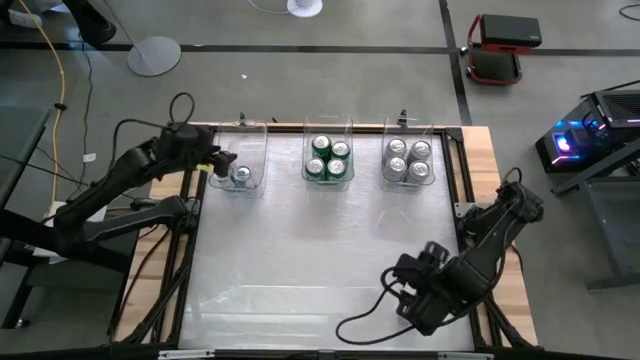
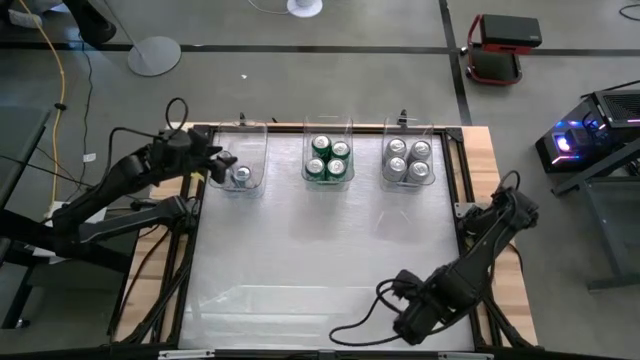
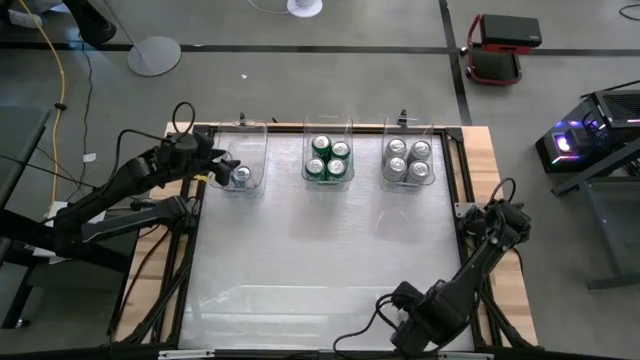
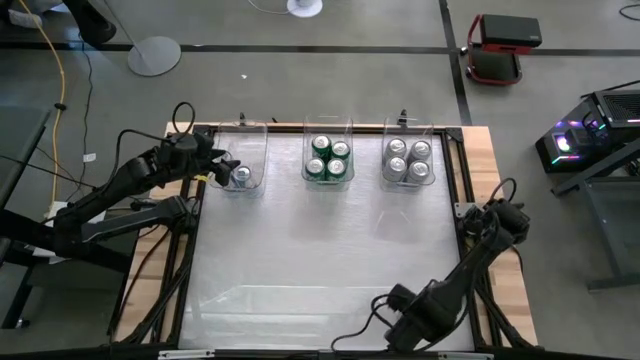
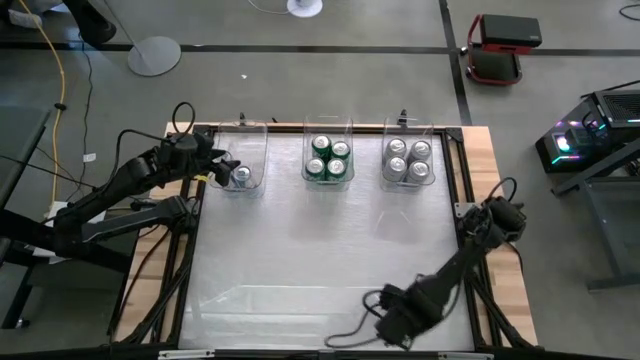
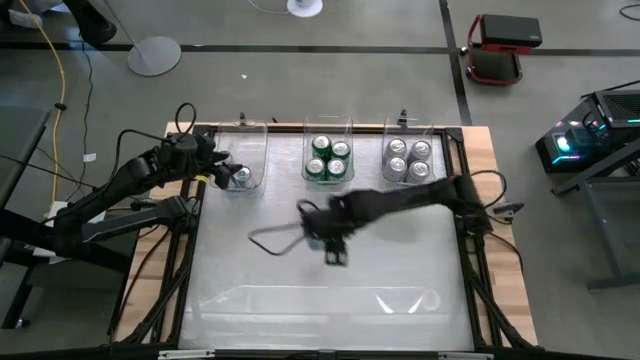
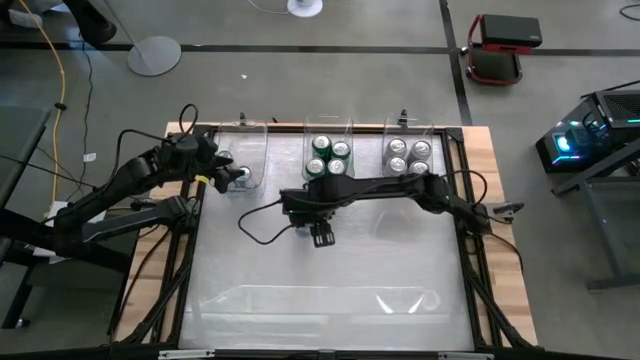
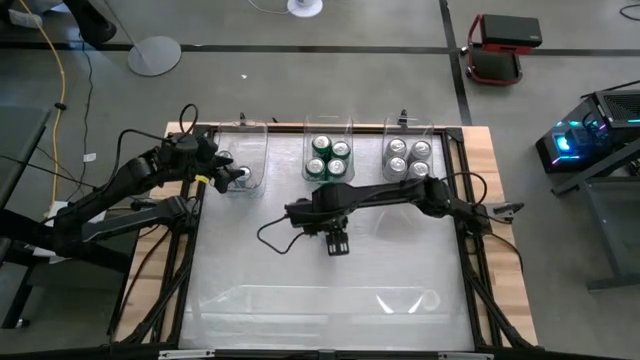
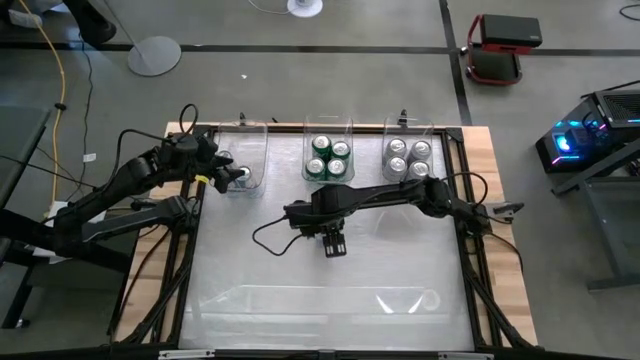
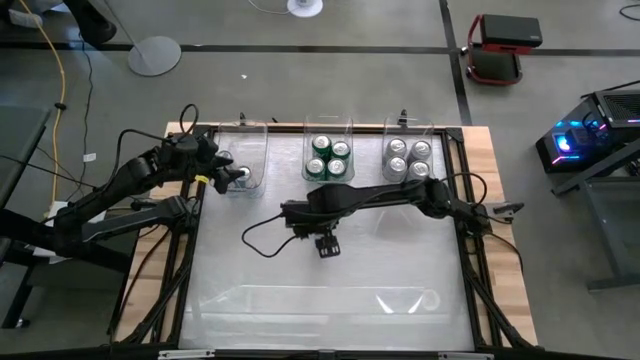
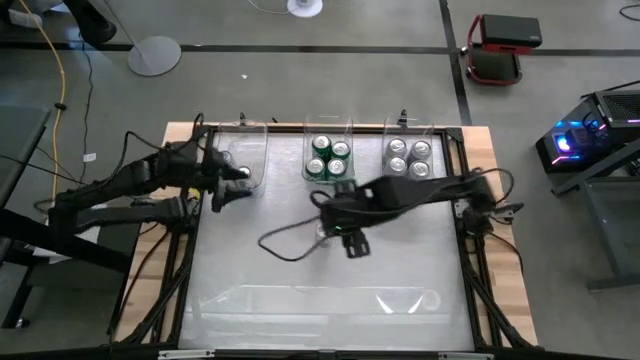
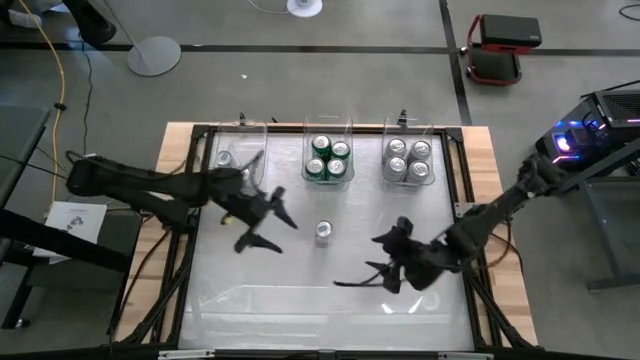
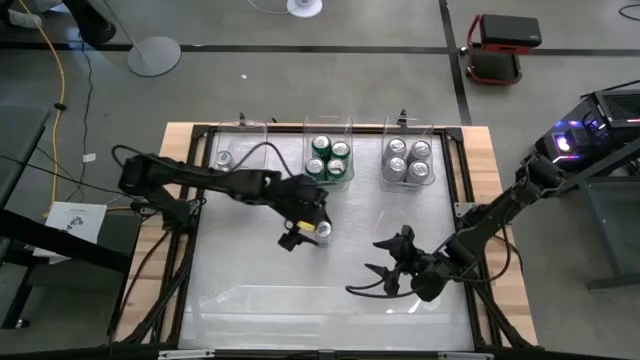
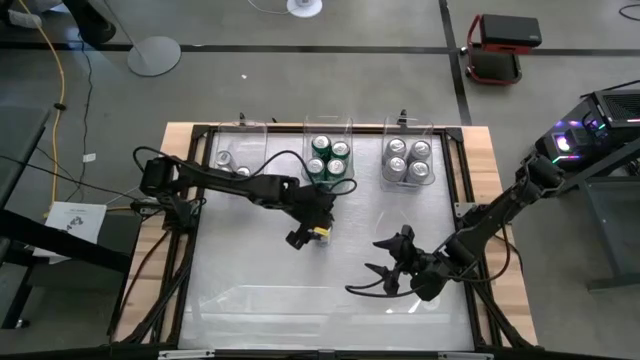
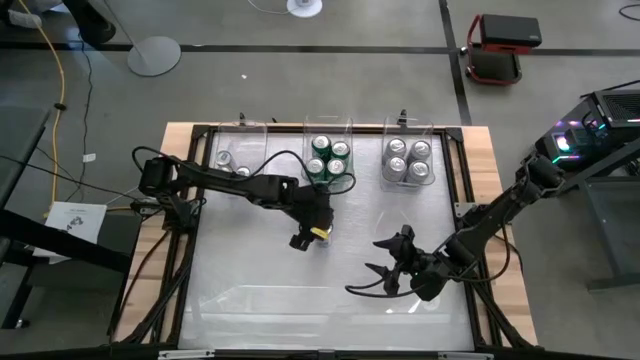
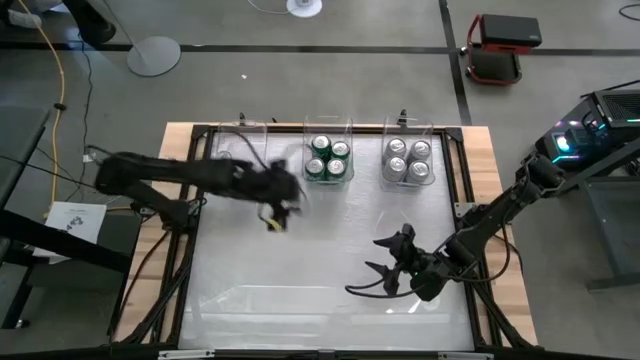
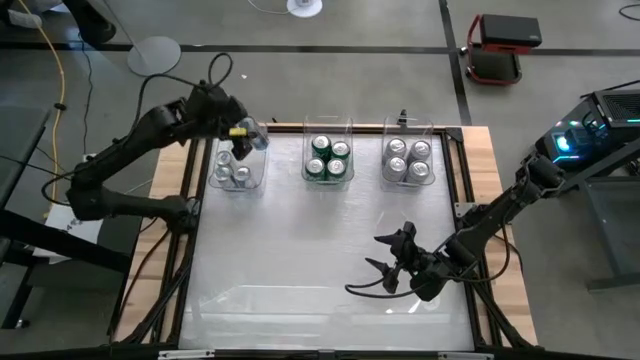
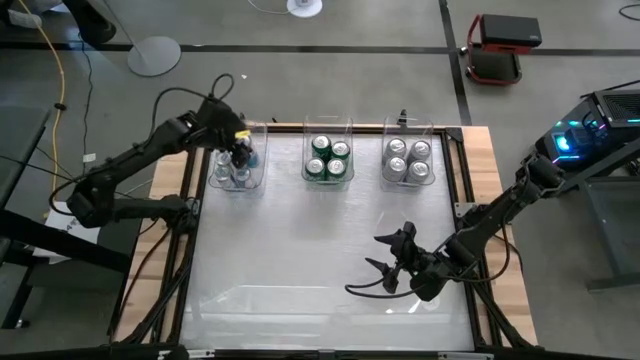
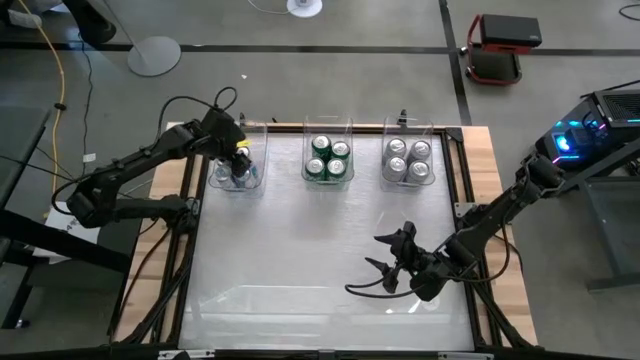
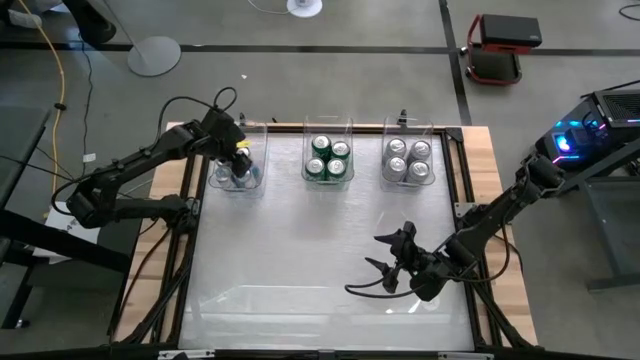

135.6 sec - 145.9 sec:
Task: Sort soda cans
Put the blue can into the left transparent bin

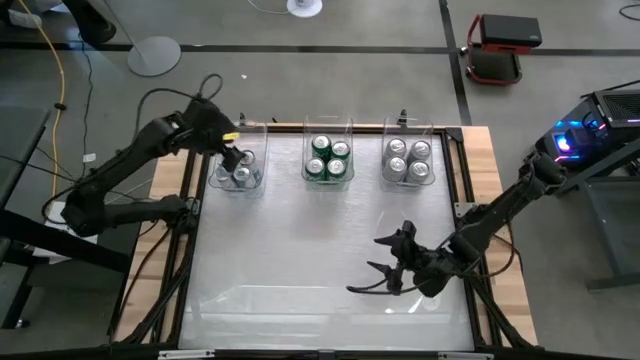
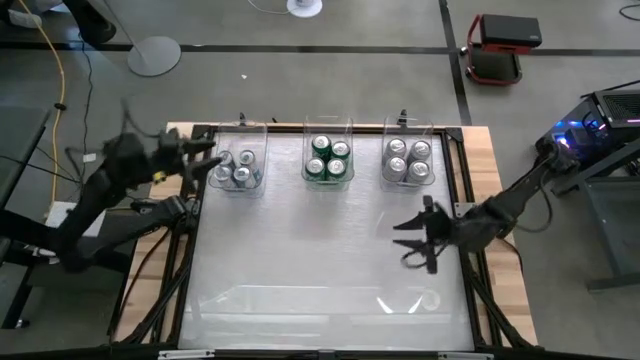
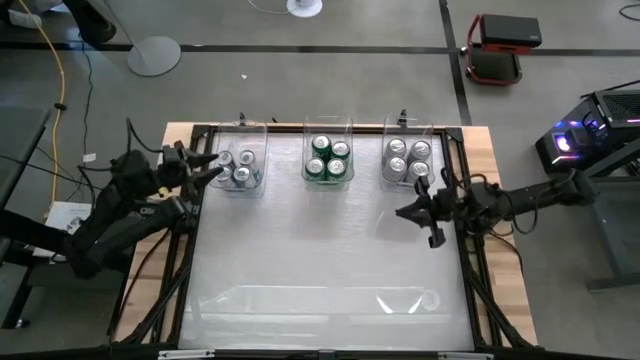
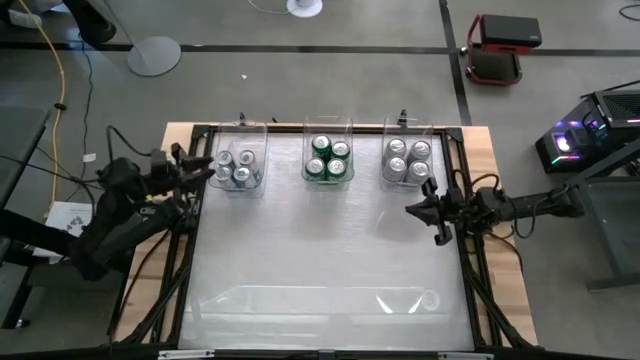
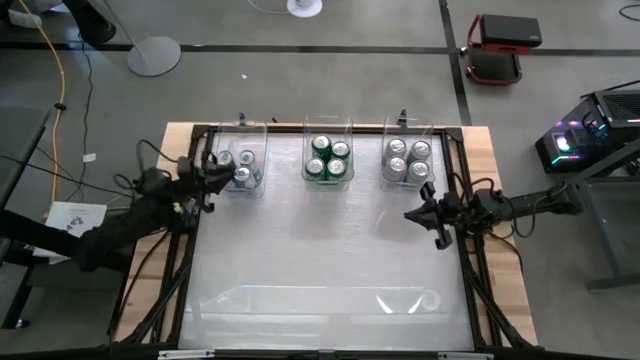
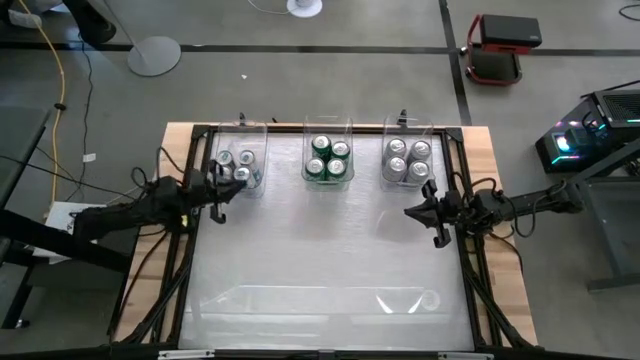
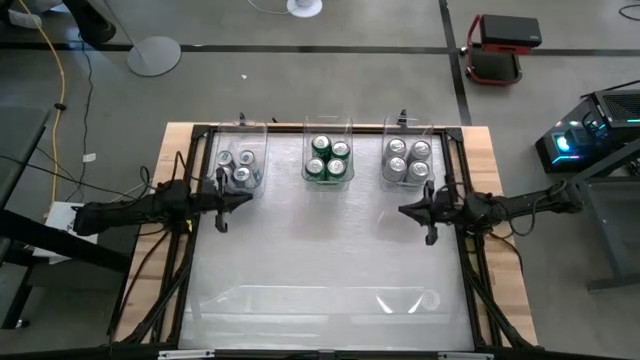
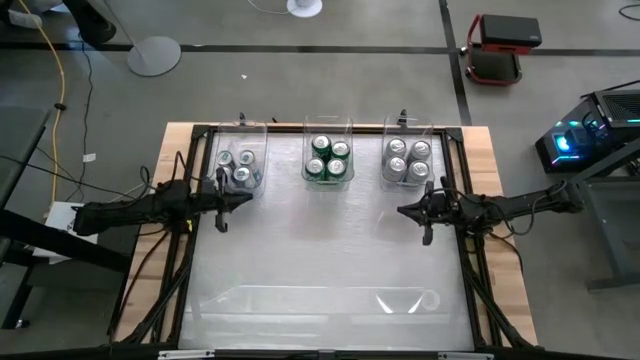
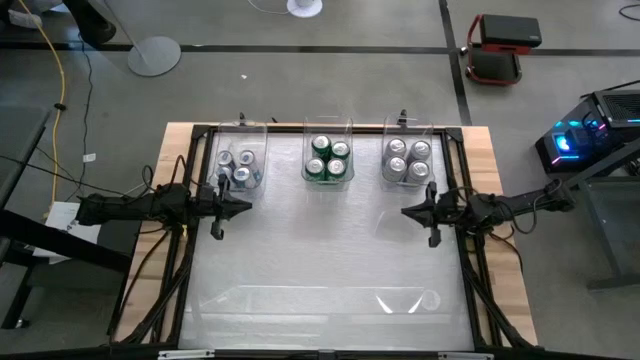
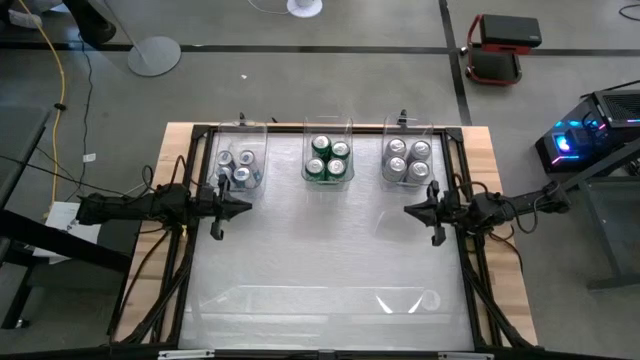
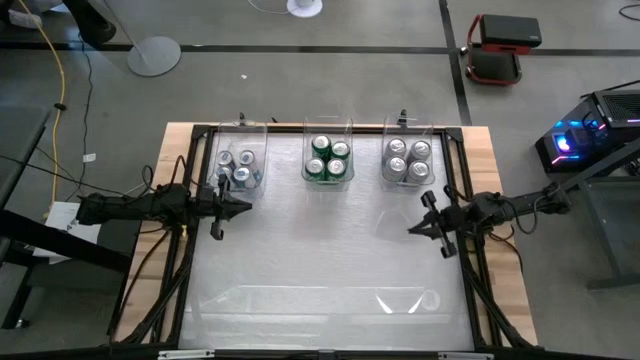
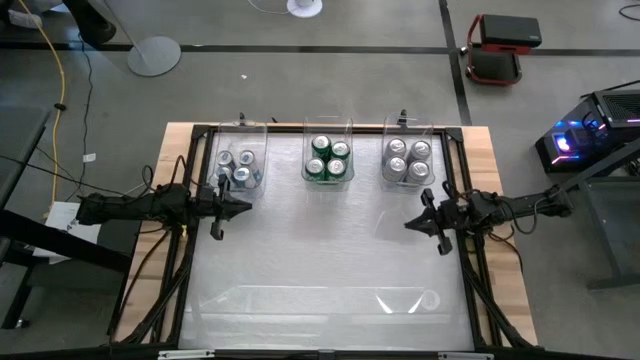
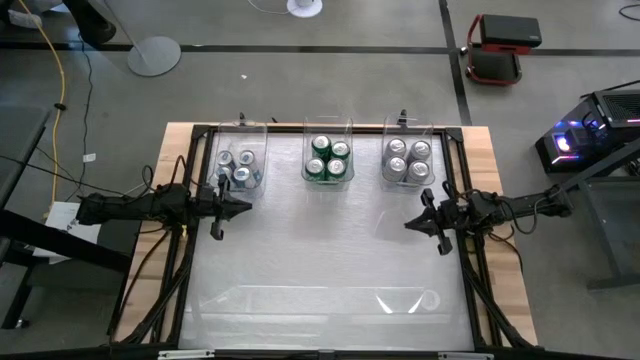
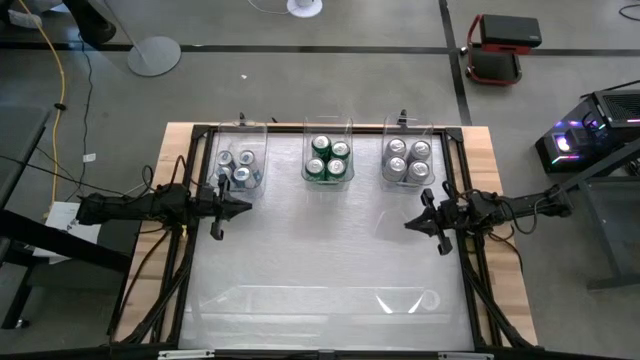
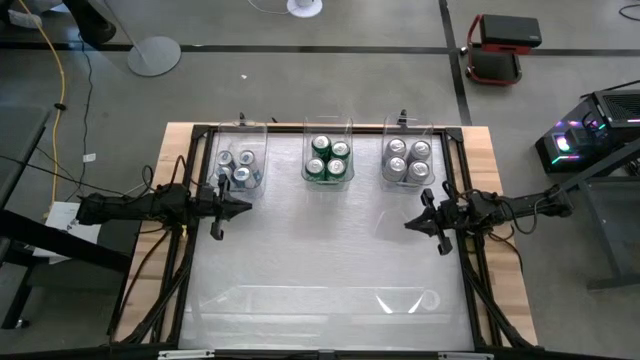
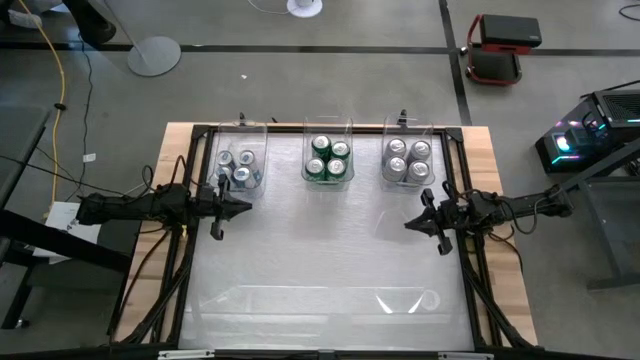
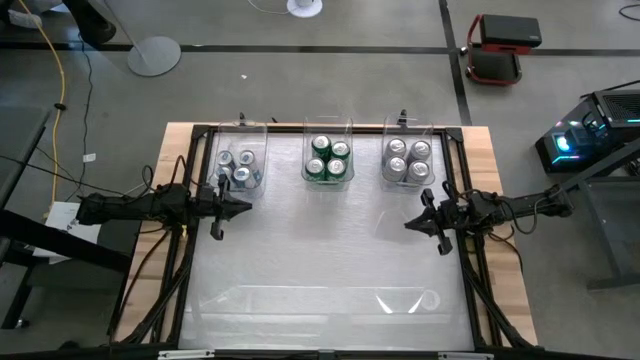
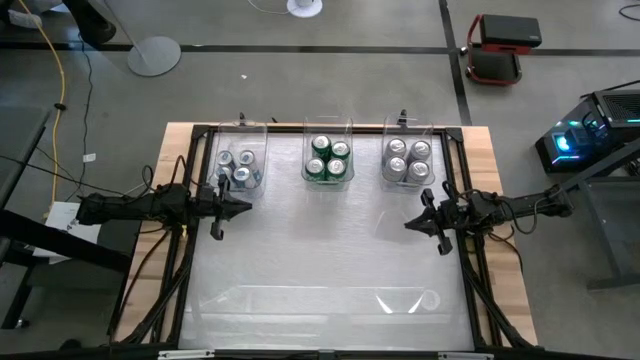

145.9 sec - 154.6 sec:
Return to Home Position

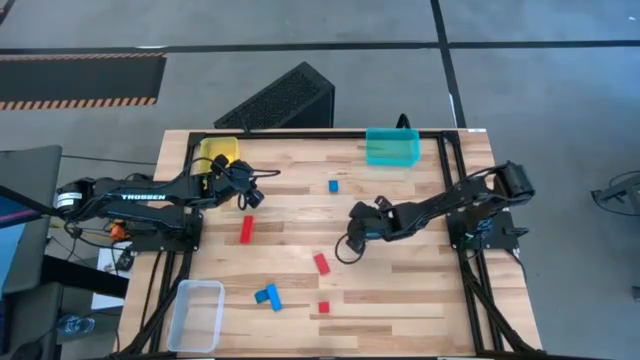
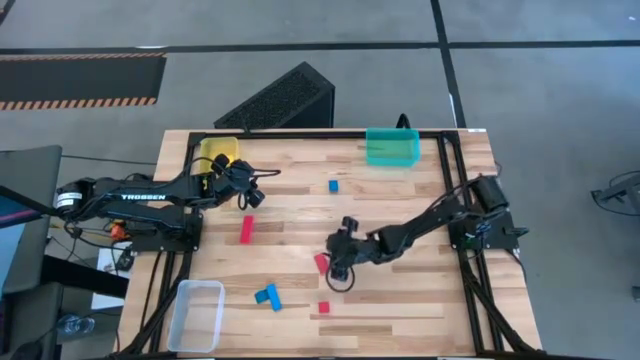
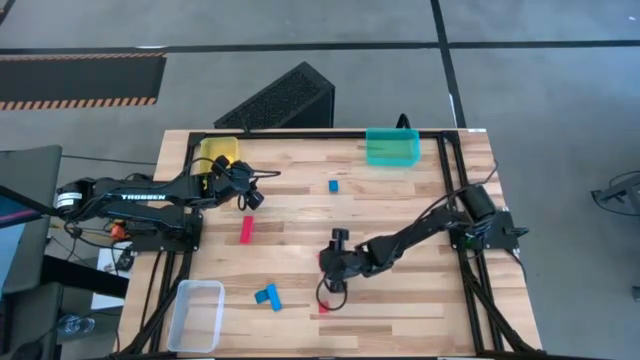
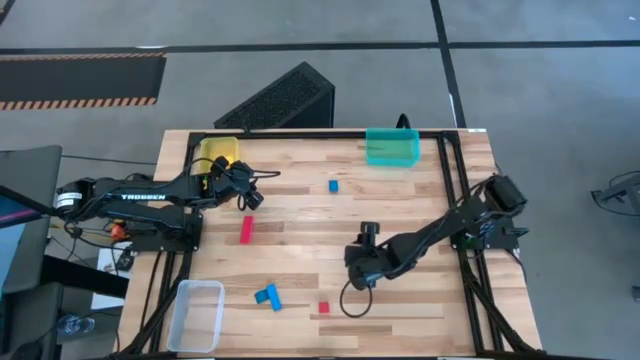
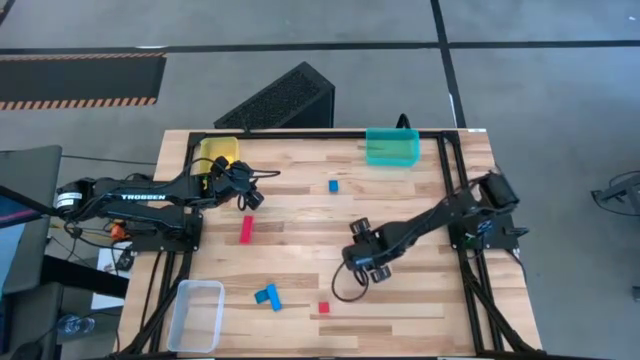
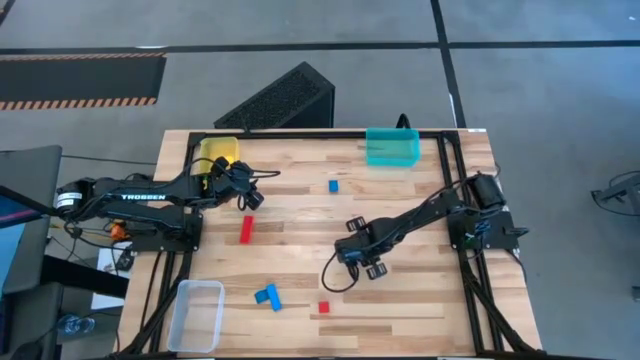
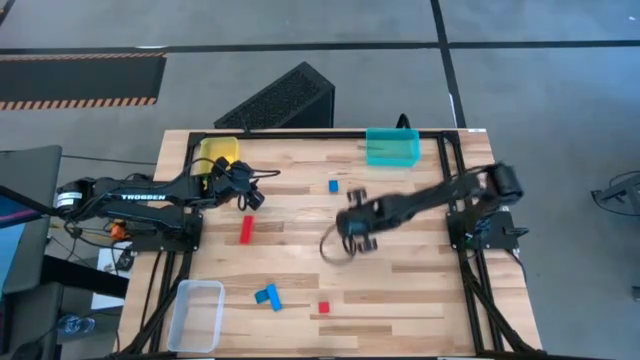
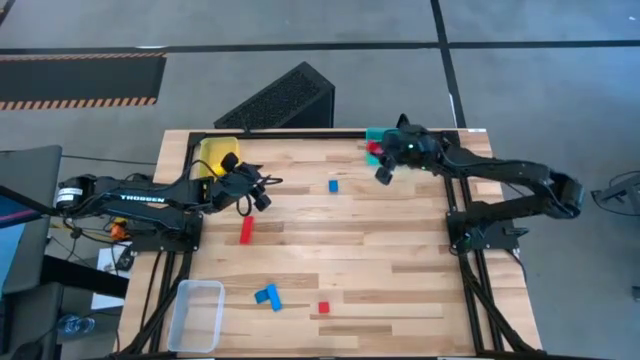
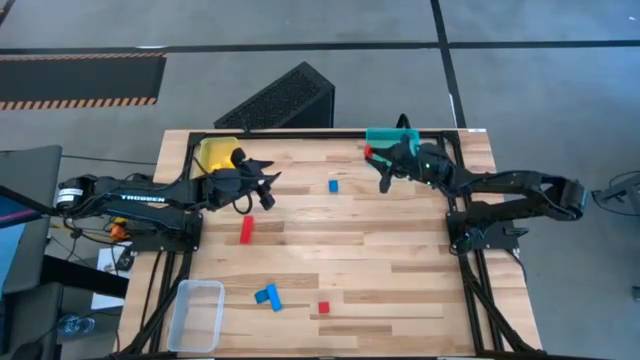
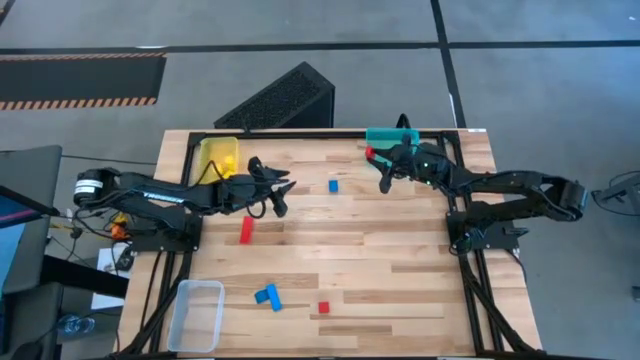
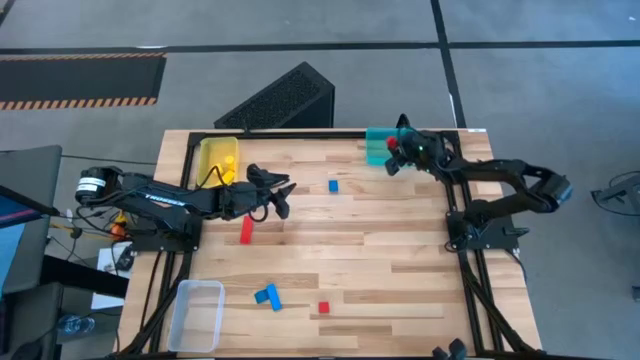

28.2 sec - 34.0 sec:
Task: Sort & place blocks by color
Put the top right red block into the blue bin
